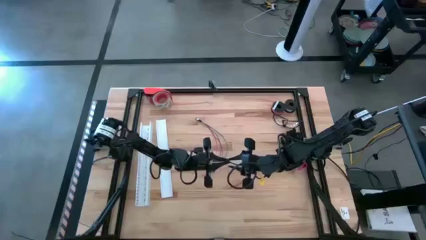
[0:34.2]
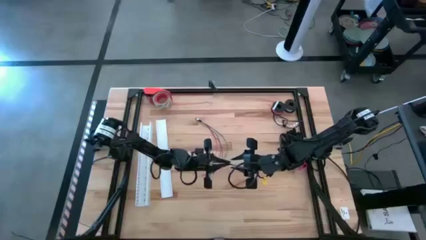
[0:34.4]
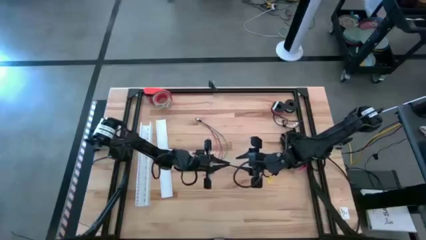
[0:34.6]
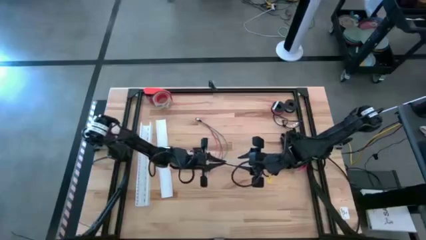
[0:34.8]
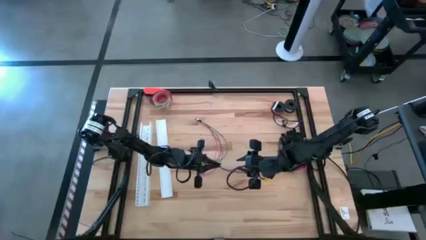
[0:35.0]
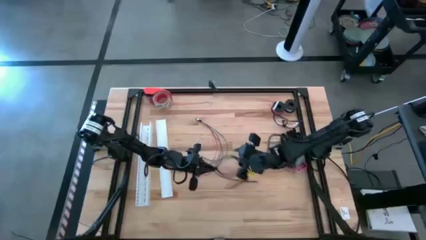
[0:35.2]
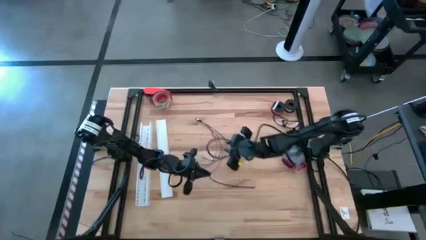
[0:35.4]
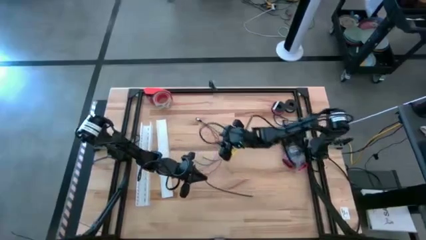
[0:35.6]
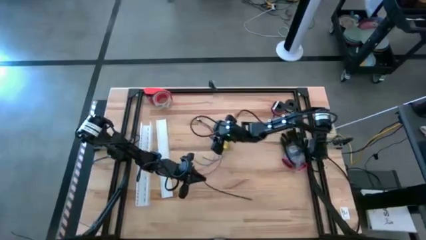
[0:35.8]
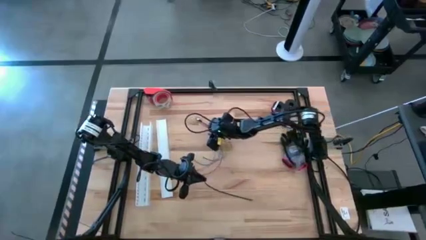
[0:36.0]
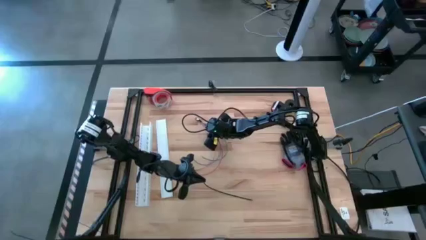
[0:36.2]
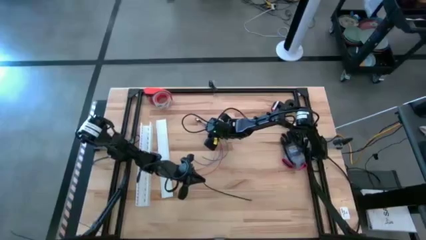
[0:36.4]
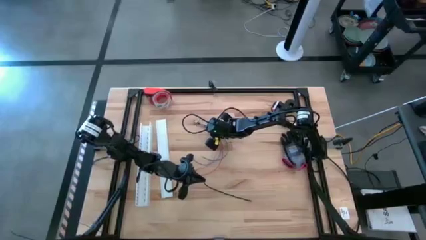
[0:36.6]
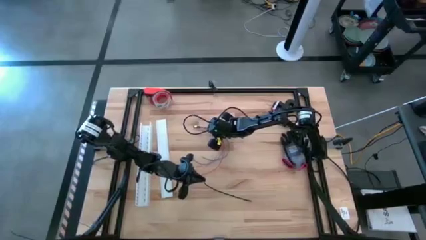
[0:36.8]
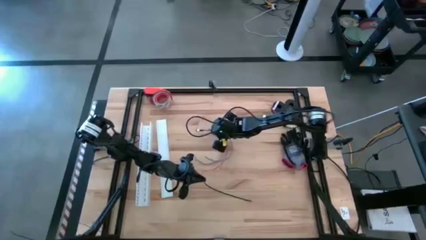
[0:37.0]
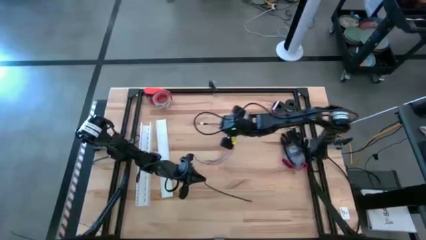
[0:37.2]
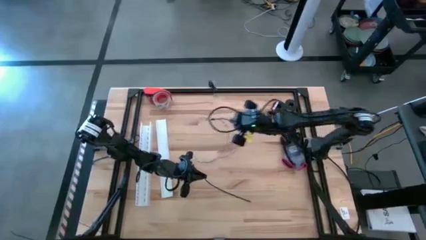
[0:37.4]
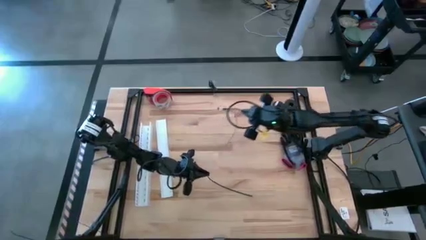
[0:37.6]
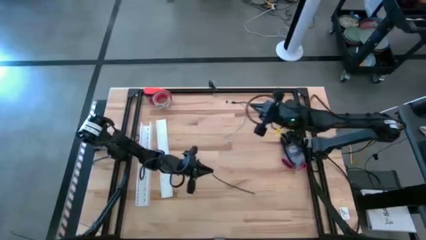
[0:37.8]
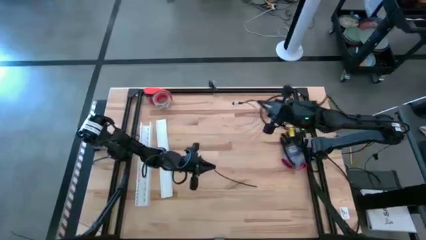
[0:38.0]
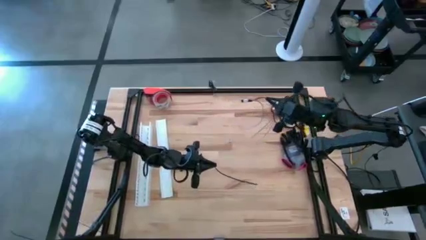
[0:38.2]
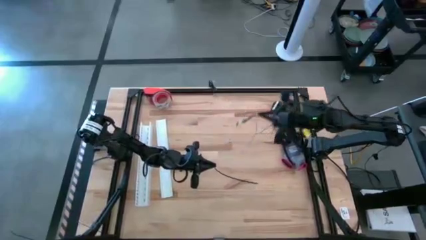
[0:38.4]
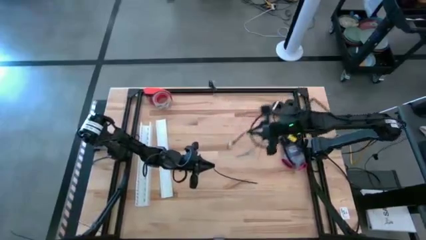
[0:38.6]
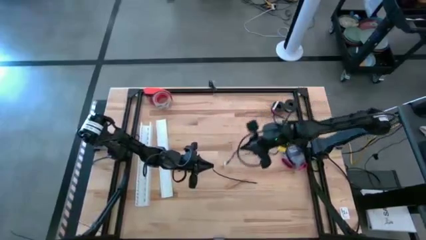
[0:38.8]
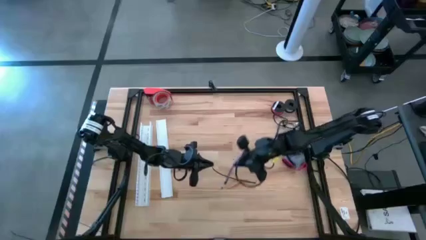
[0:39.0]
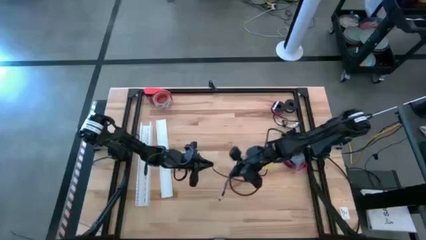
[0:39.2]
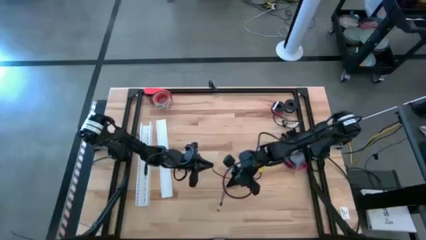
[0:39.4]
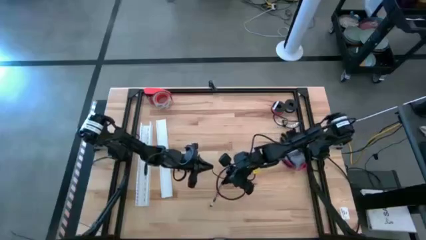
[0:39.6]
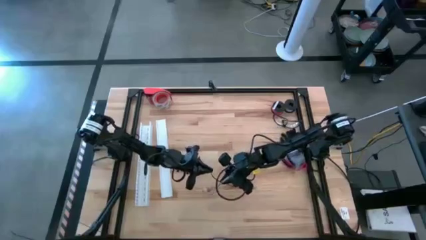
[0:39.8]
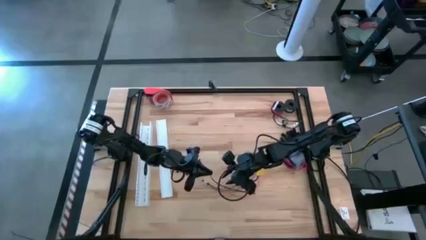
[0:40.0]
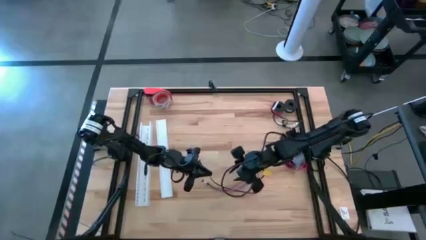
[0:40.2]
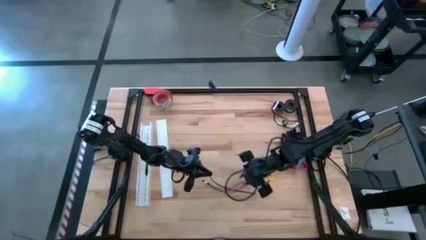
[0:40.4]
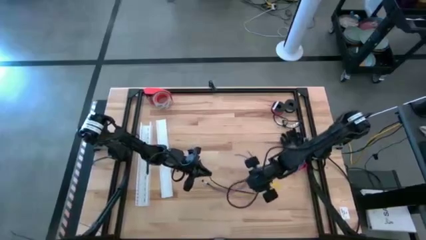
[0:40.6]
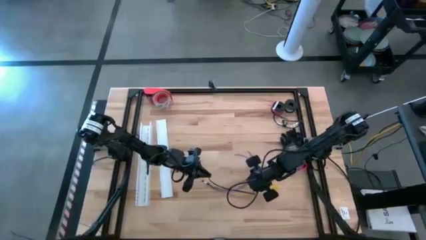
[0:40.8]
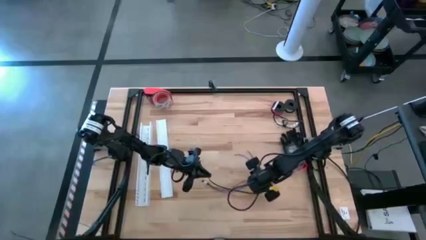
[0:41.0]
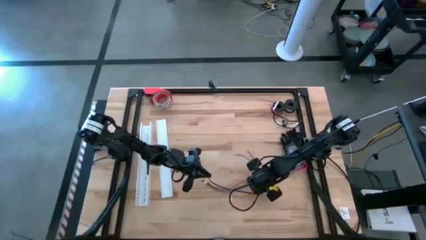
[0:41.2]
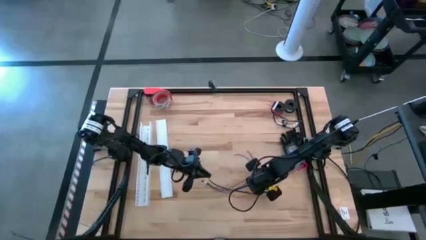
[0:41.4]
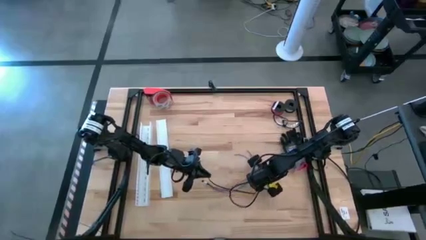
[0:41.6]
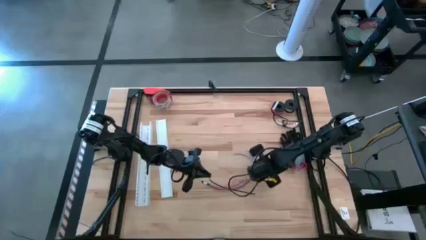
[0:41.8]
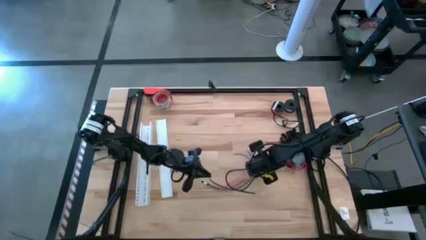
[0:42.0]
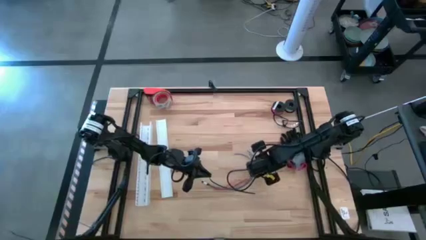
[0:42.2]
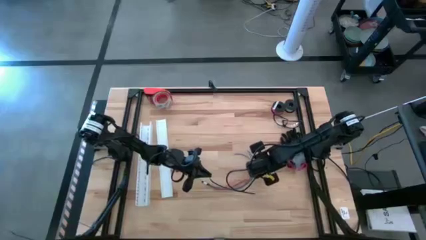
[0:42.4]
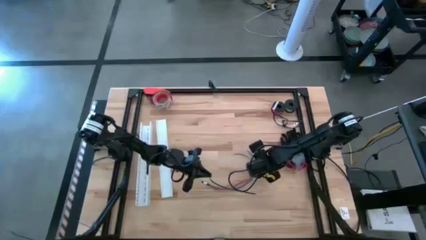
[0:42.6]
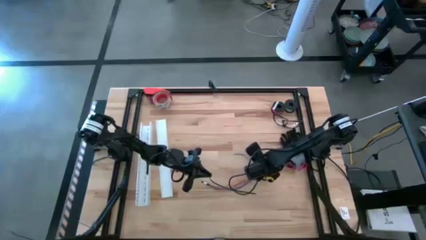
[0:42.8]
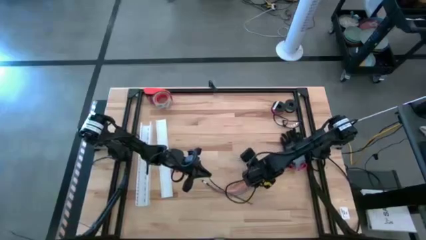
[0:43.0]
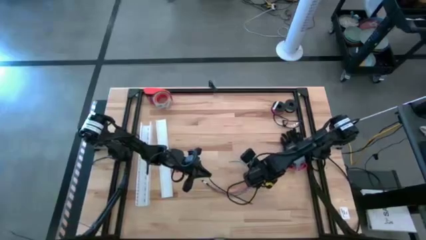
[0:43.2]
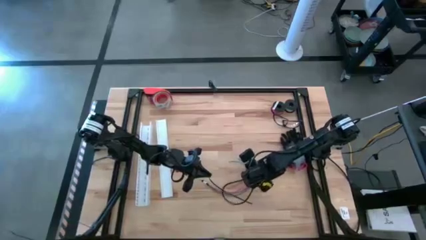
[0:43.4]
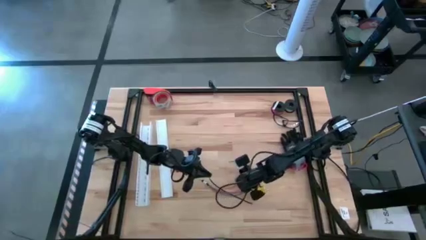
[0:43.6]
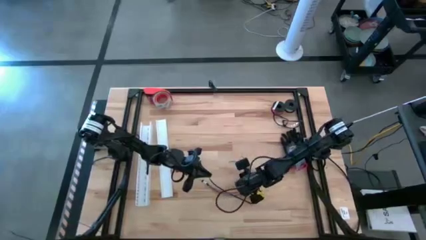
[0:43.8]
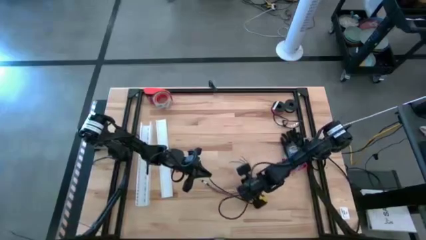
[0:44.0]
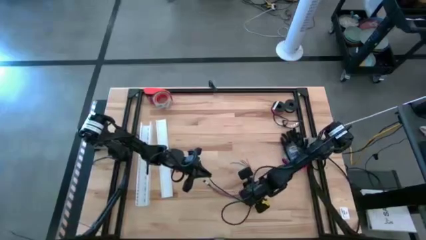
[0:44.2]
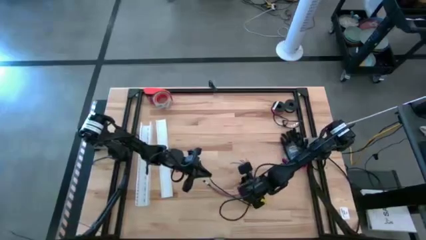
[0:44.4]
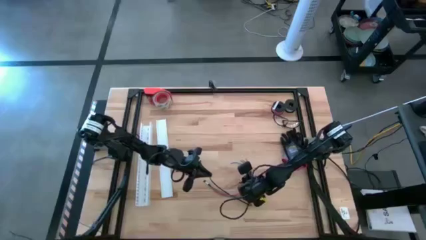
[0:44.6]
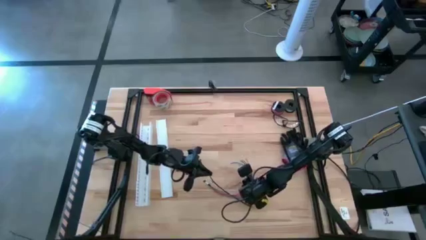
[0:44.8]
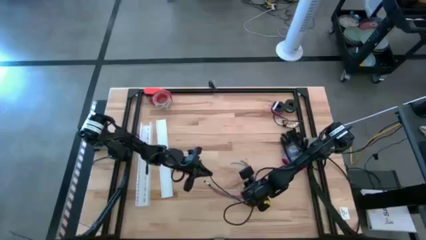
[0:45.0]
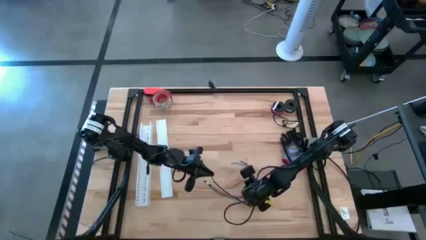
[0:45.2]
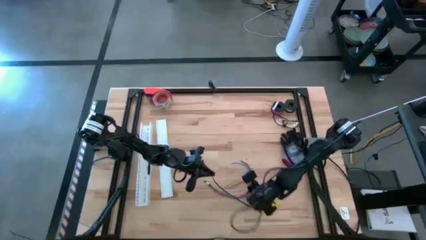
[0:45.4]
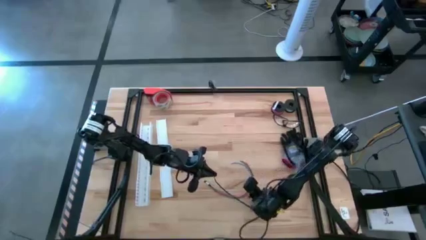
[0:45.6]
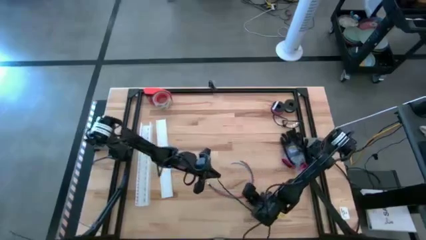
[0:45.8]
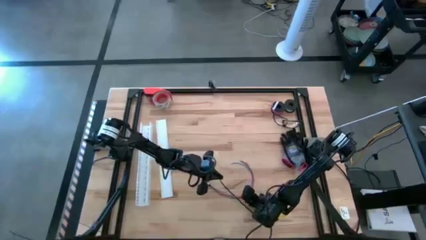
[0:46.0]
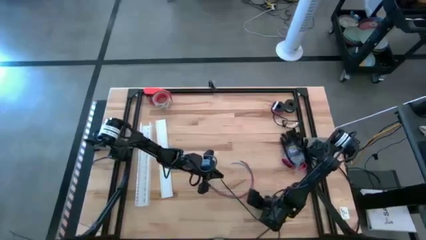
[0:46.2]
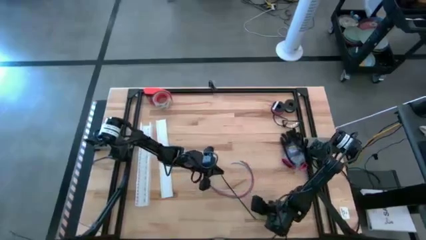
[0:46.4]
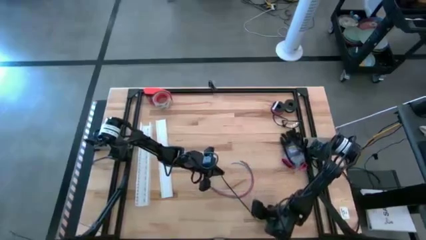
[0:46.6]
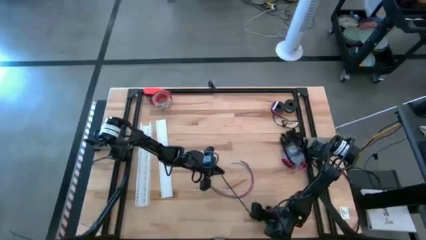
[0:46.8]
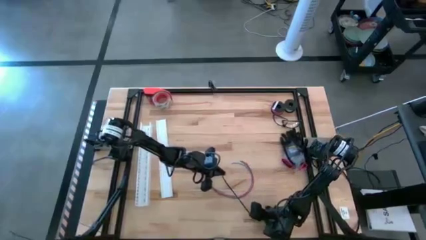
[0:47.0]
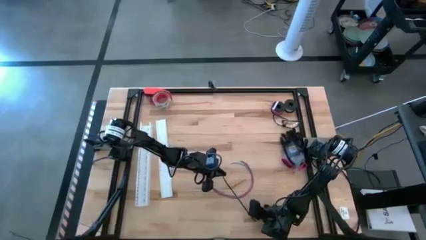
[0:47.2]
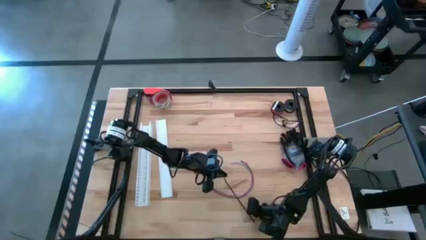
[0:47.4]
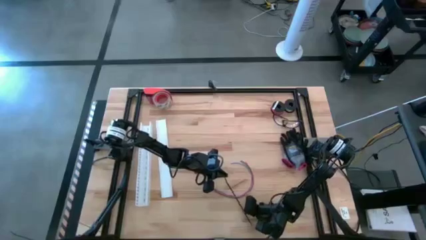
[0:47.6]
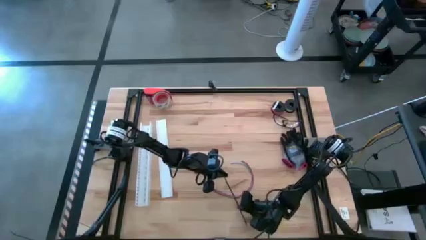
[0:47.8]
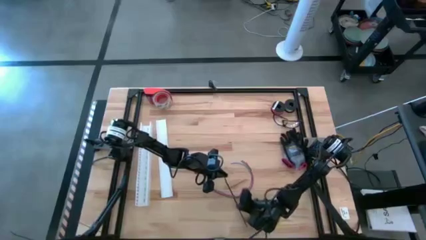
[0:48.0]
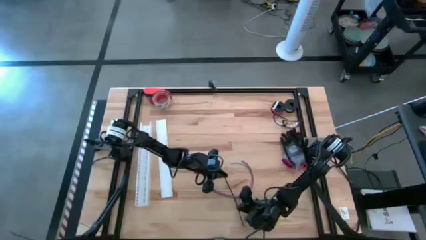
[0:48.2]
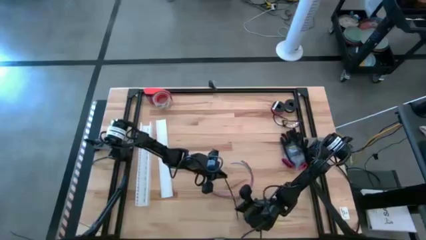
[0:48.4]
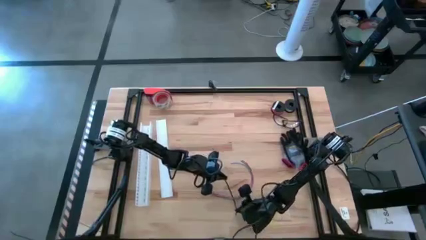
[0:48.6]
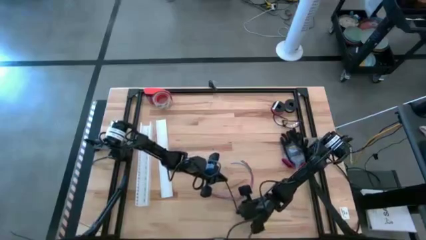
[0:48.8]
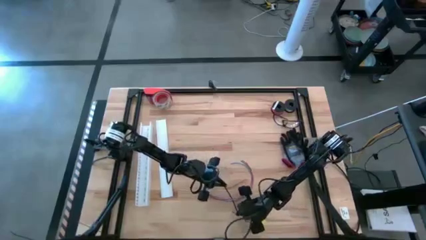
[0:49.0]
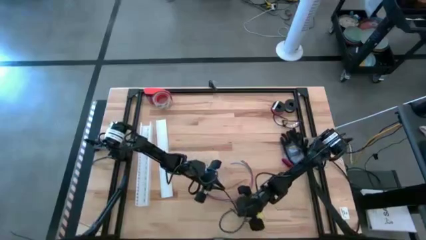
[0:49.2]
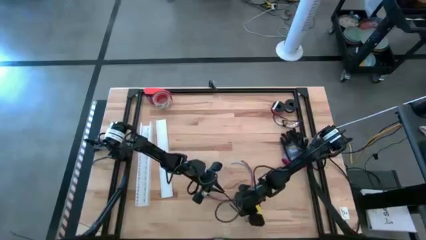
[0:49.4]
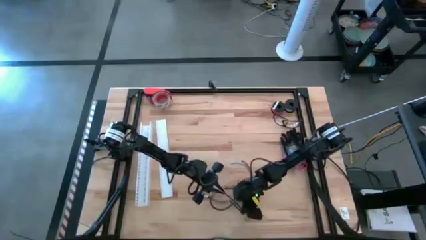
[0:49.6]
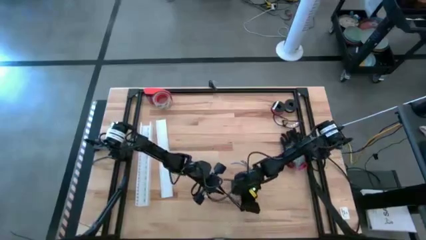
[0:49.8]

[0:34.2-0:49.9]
Task: Ziptie cables
Wrap the black zip tie around the cables

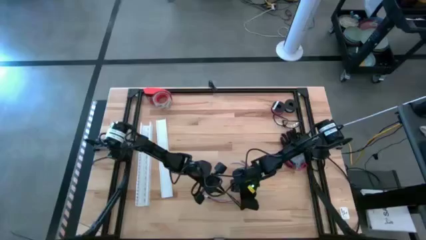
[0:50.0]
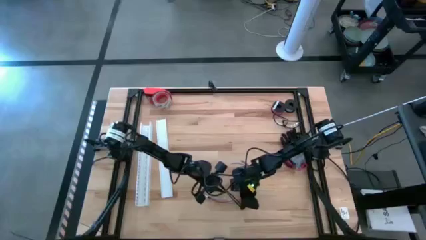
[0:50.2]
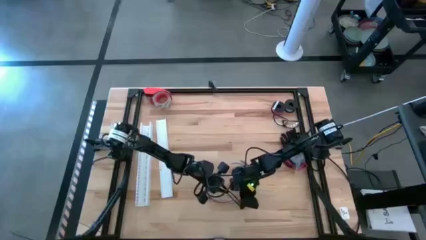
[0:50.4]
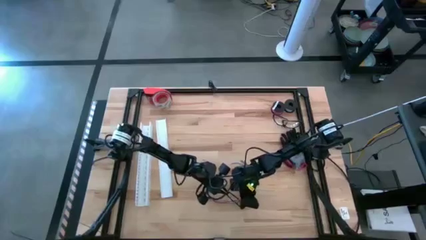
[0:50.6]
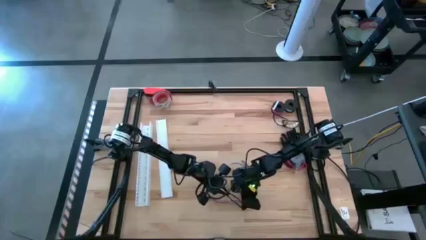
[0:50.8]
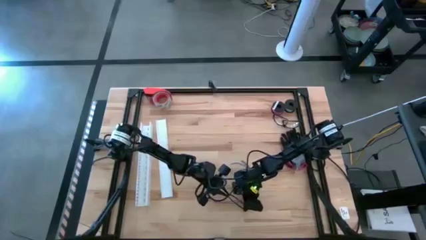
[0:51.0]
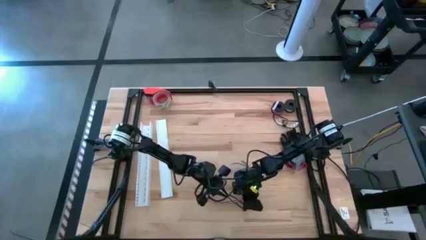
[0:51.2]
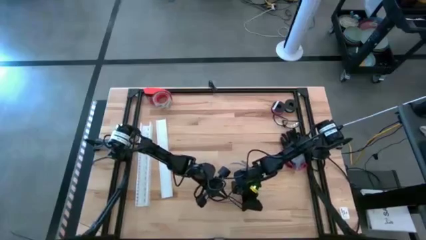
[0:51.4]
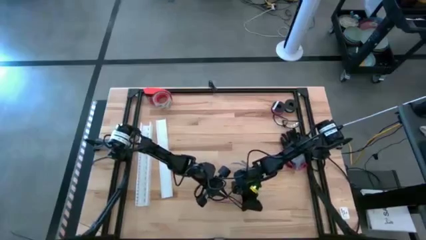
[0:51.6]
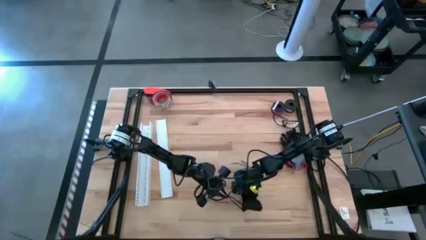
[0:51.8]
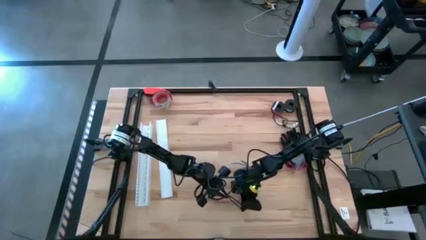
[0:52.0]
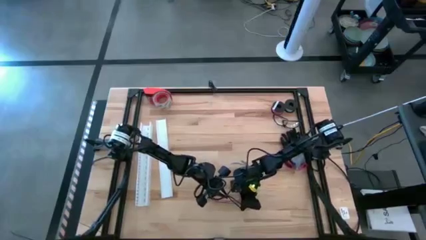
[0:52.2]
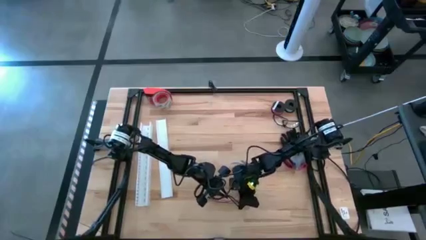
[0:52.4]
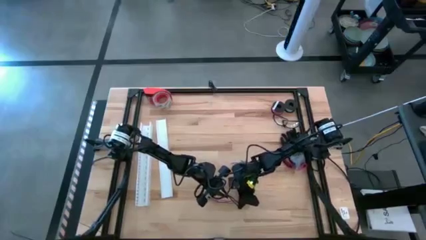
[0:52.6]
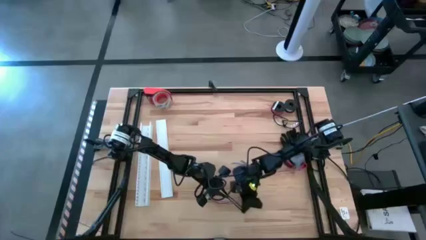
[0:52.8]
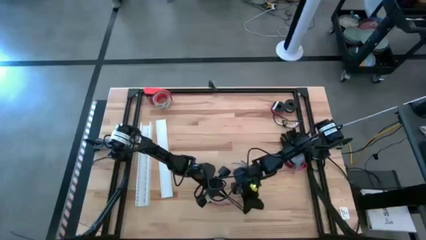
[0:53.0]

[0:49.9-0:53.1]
Wrap the black zip tie around the cables
